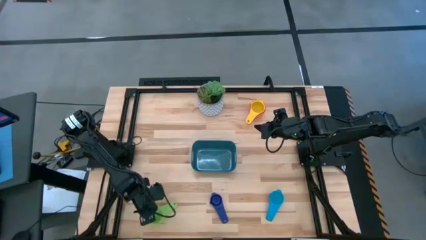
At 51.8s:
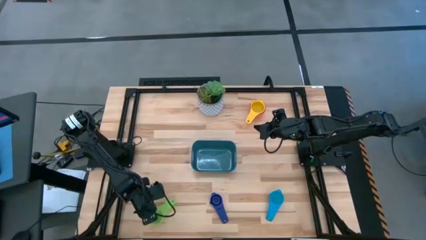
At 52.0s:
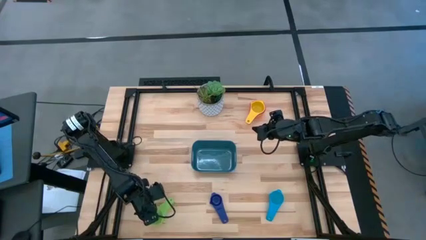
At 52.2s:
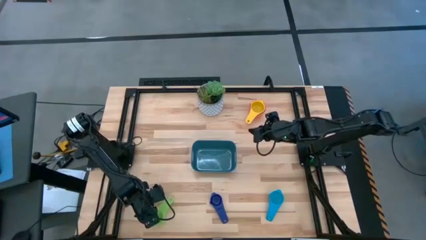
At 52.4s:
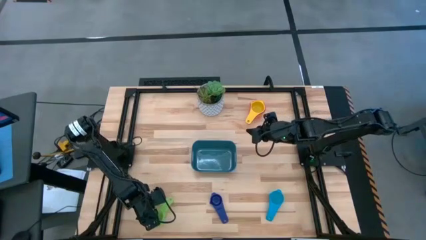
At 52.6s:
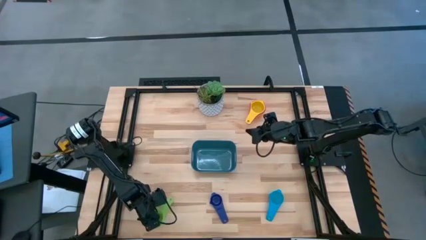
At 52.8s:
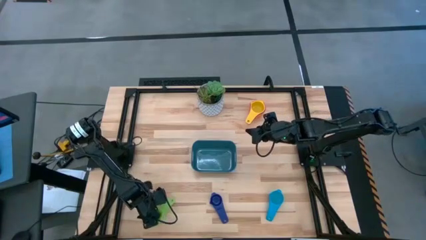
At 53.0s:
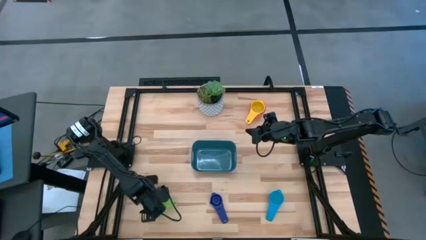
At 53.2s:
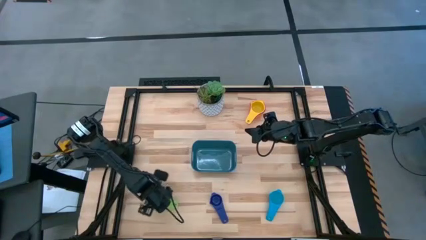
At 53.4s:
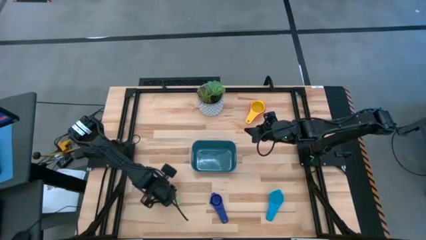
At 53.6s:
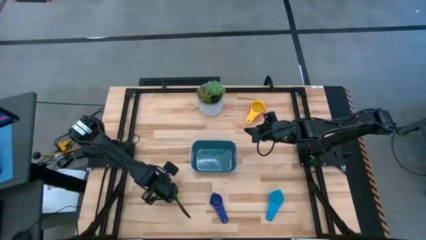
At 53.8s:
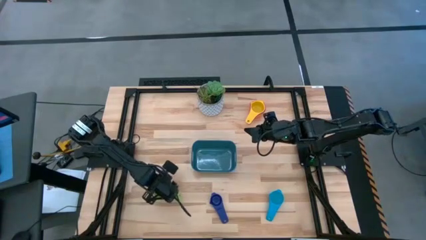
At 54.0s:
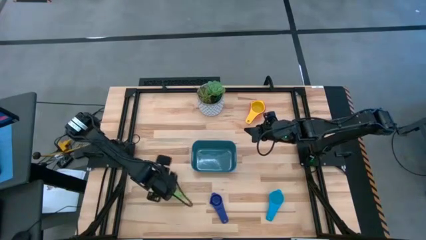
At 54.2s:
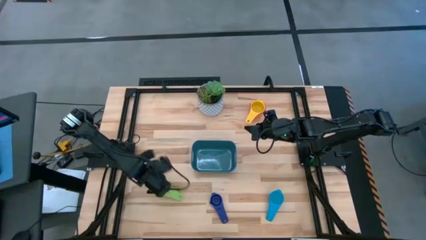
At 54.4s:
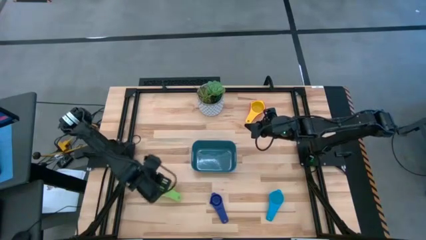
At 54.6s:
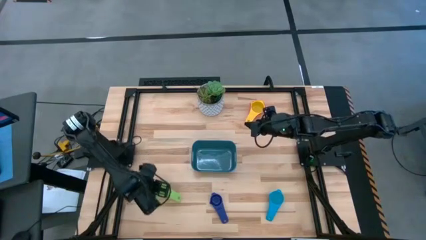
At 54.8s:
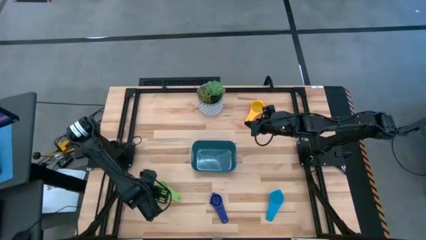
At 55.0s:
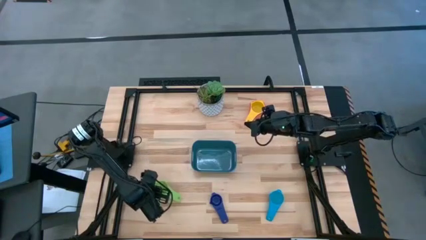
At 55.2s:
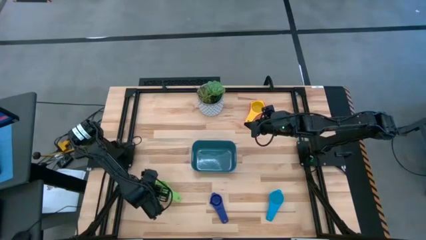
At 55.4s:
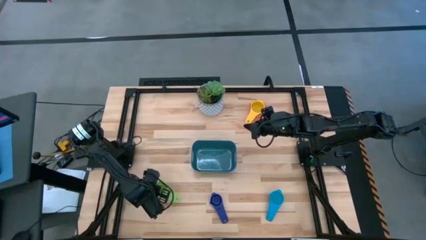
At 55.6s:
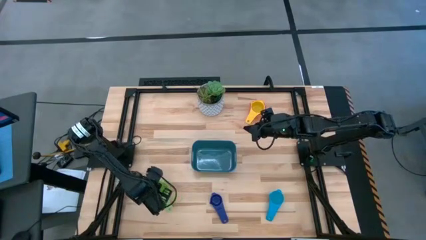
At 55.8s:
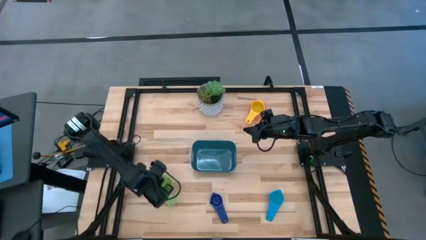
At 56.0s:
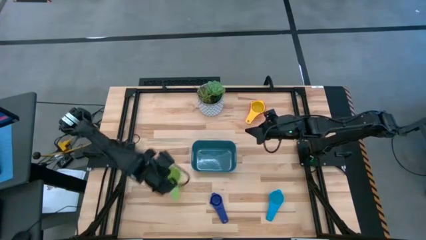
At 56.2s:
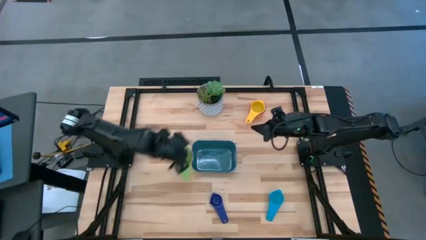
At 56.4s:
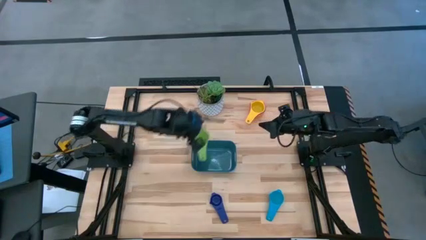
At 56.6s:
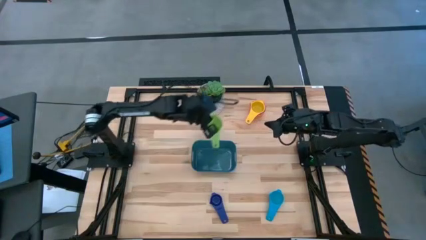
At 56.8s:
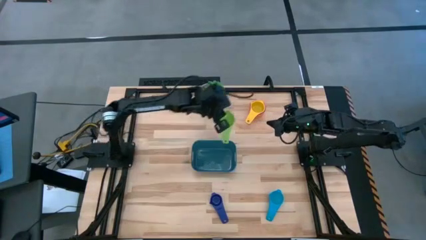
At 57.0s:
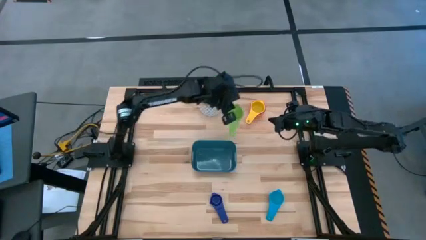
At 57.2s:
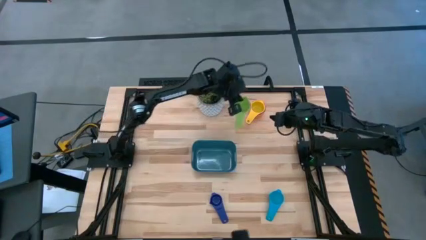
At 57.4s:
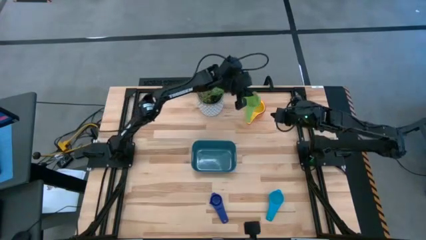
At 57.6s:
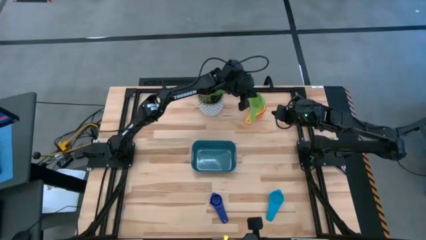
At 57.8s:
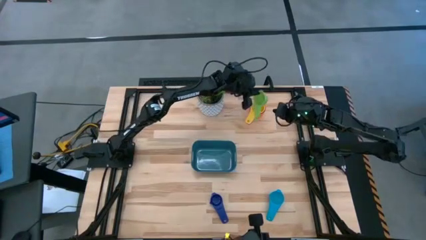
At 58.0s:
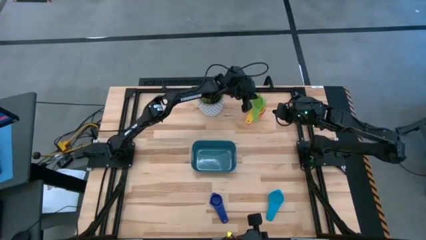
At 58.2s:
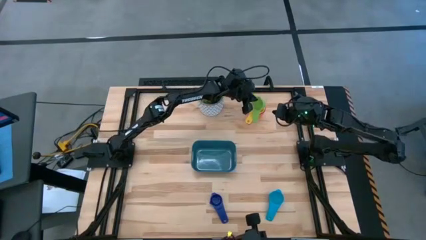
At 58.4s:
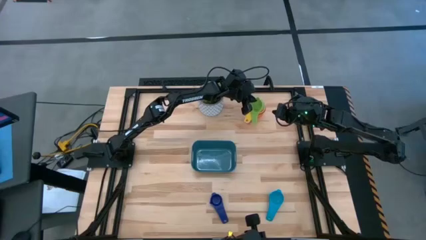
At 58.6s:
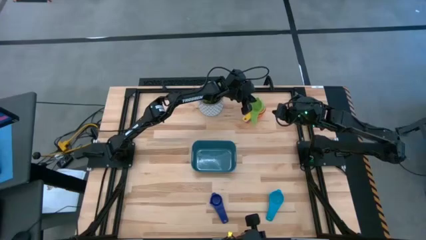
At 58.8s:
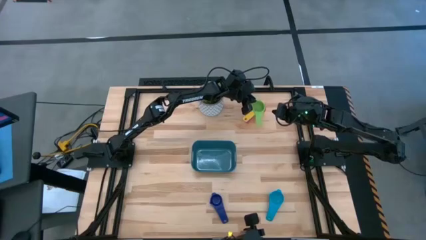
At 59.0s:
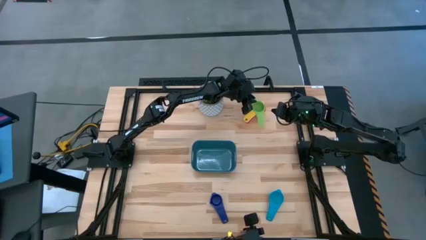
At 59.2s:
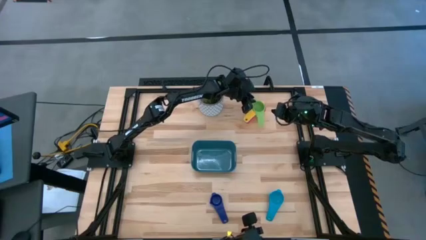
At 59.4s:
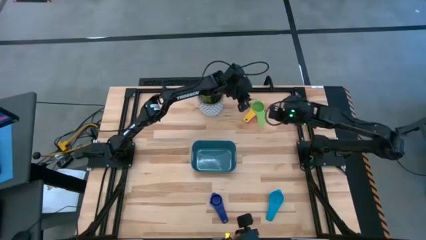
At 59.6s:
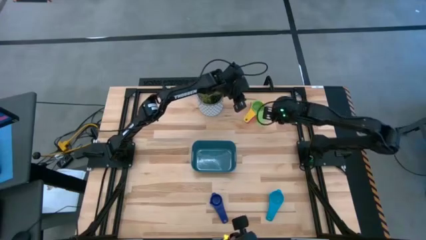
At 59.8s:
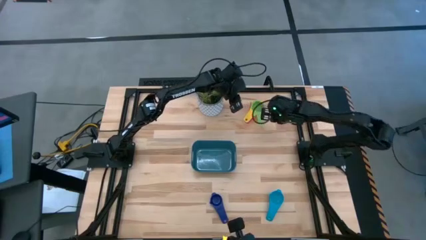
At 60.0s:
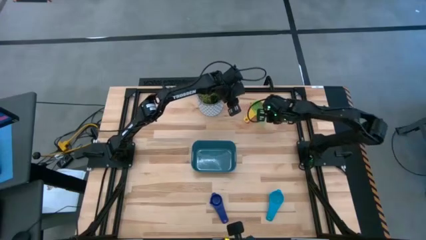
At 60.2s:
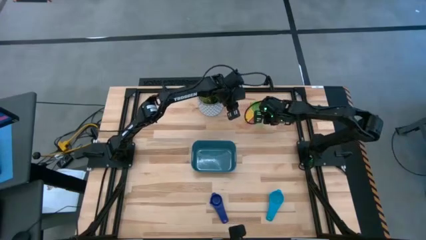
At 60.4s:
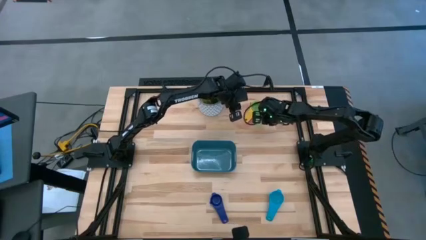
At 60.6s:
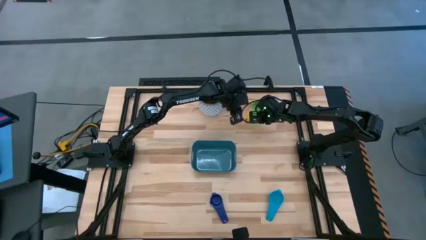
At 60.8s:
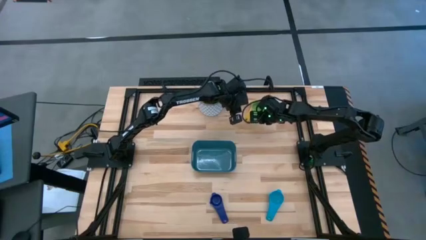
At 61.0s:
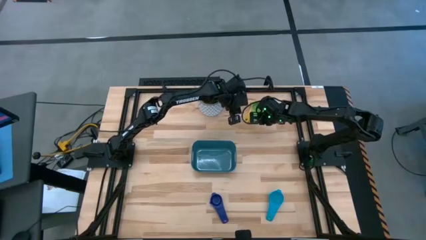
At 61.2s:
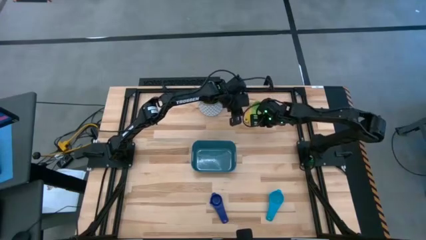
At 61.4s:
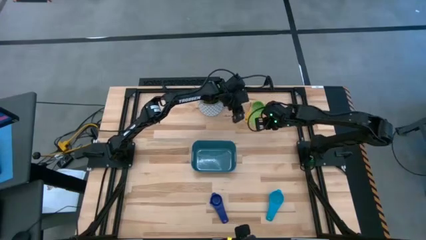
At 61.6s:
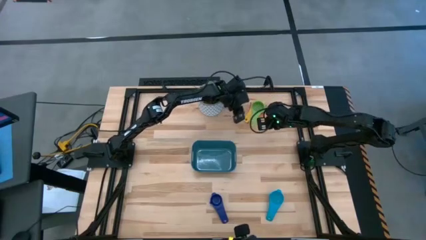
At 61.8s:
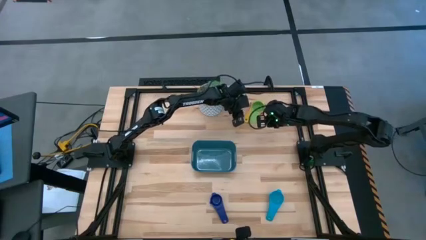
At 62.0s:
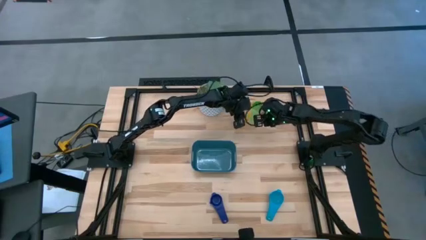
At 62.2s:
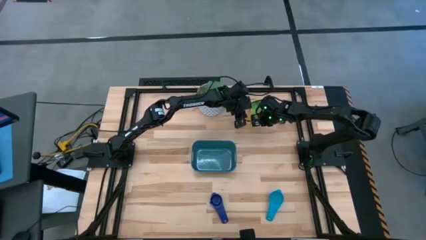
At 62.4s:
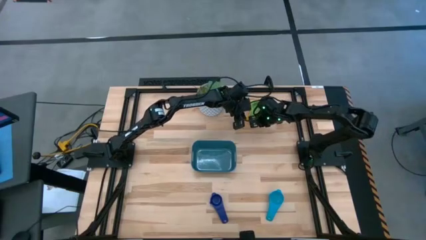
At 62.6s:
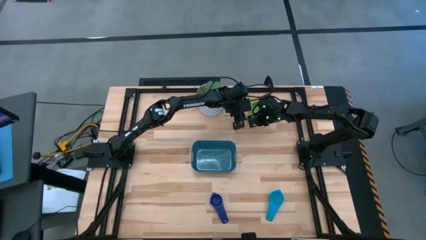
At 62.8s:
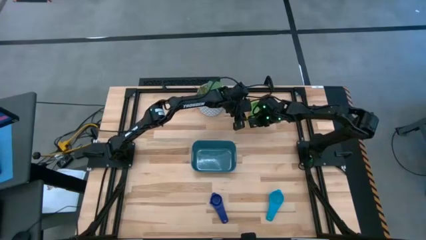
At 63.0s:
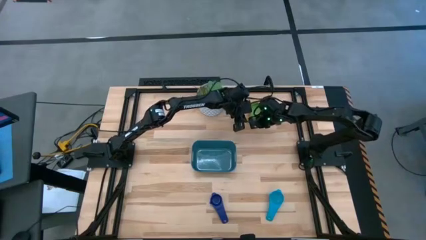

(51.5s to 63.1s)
Task: Nest measuring cups in basket
Stack the green measuring cup on top of the yellow measuring cup

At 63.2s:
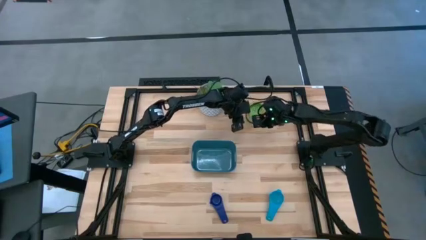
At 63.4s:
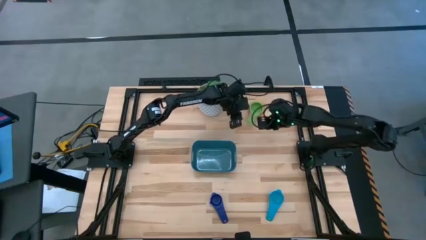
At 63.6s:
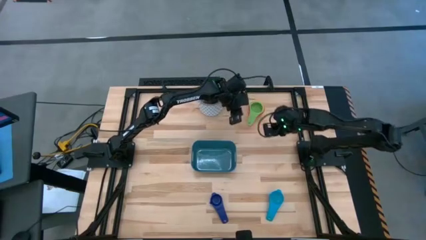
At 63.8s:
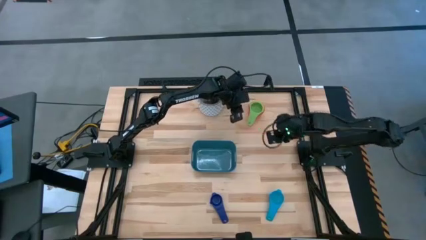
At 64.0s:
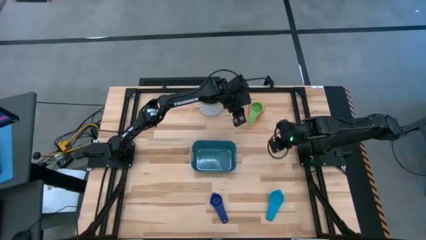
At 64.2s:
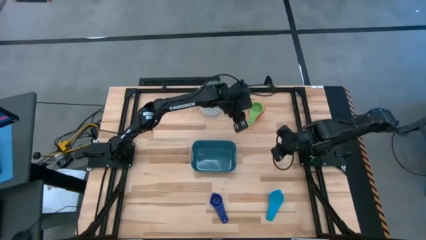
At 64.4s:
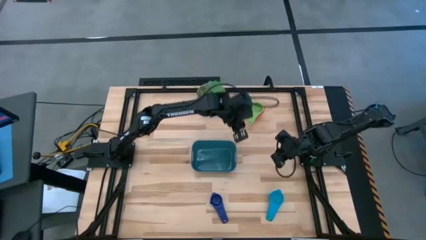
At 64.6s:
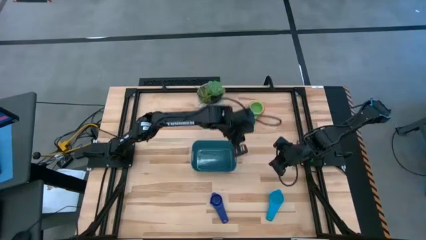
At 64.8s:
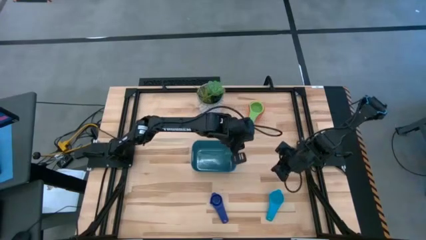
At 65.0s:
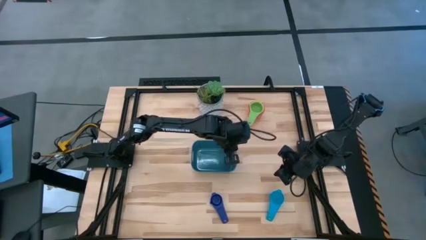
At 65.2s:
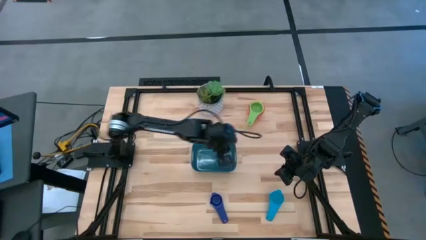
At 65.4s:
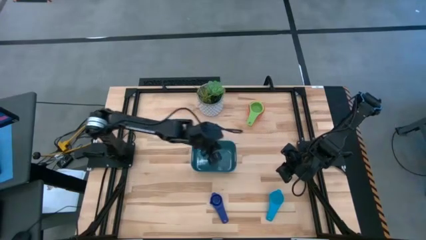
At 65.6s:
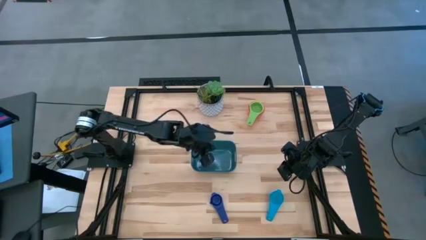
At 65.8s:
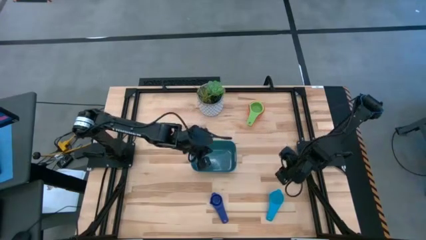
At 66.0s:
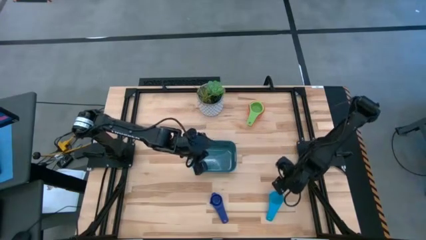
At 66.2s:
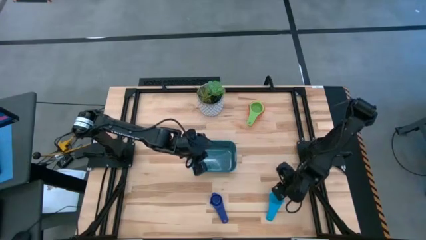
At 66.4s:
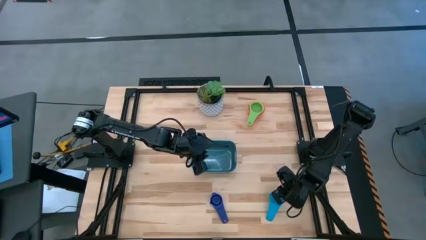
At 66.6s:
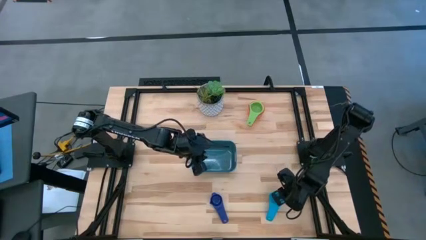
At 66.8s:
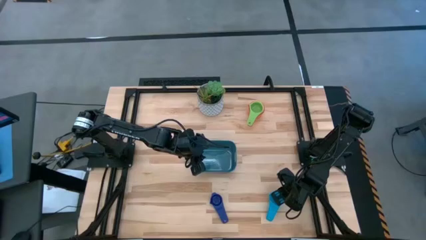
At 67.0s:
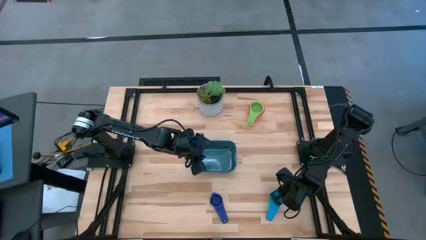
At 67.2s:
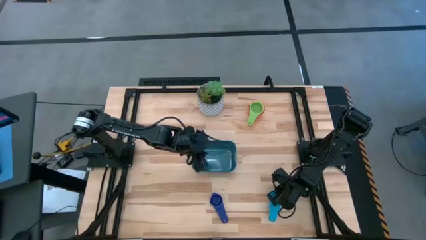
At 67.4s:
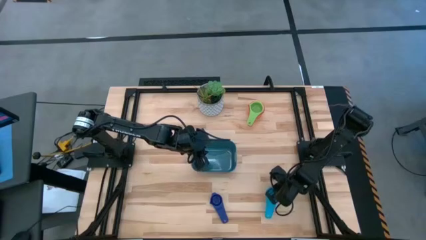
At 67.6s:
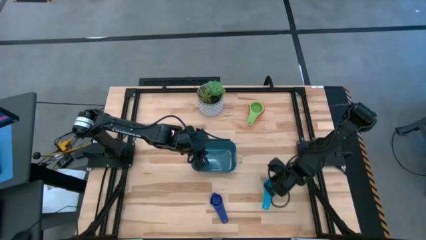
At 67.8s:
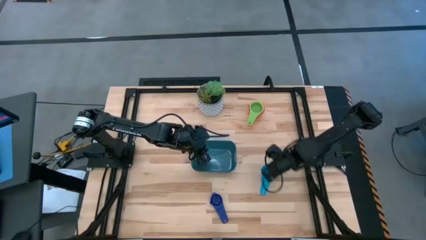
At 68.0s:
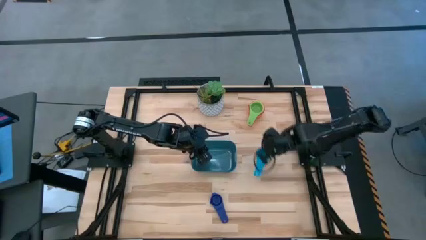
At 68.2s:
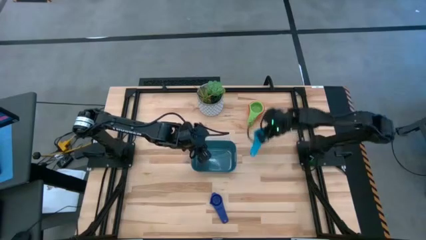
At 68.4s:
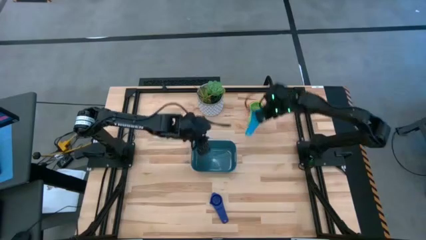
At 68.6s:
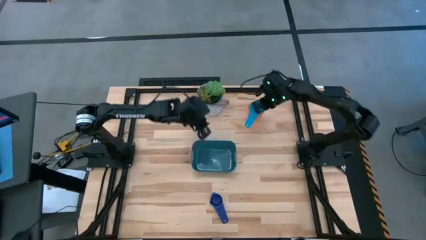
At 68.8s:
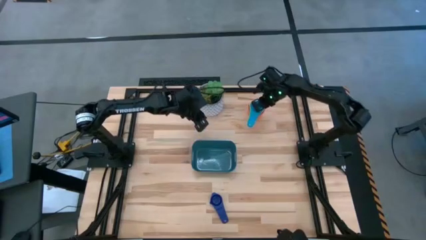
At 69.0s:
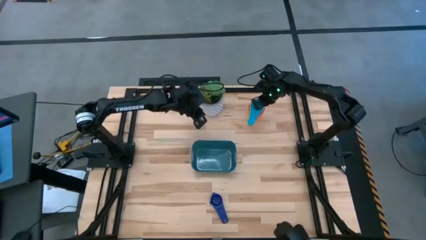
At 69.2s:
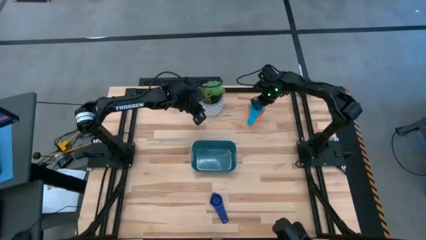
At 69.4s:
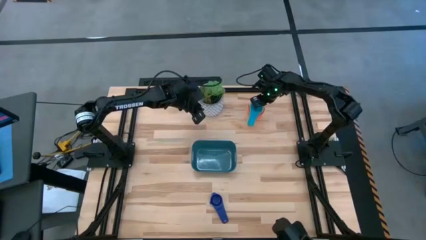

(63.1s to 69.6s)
Stack the light blue measuring cup on top of the green measuring cup
